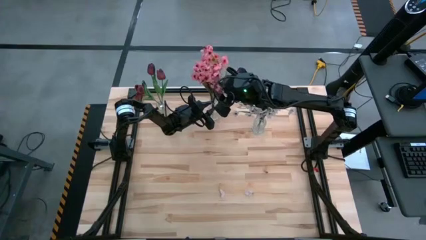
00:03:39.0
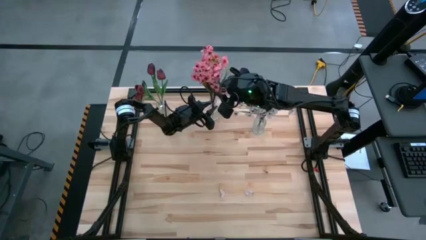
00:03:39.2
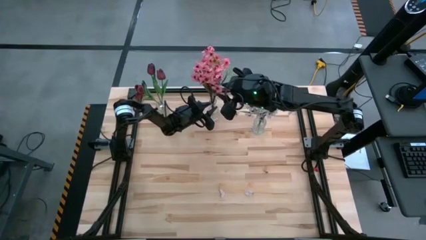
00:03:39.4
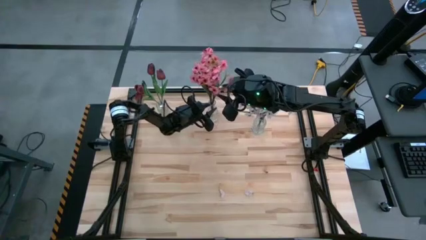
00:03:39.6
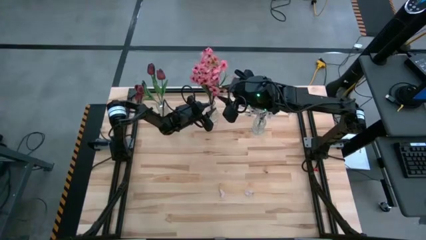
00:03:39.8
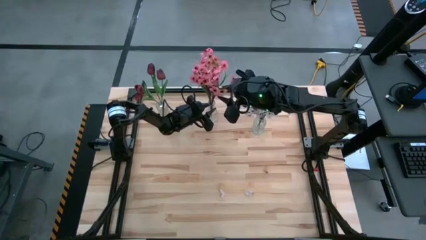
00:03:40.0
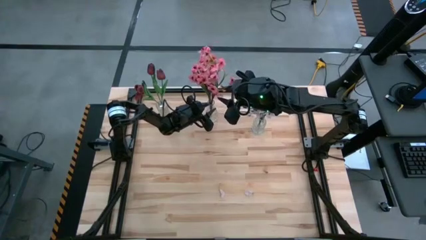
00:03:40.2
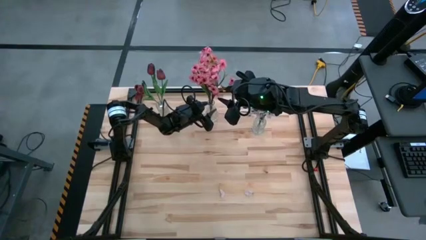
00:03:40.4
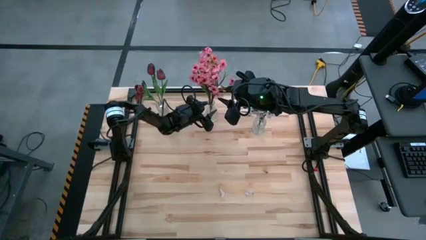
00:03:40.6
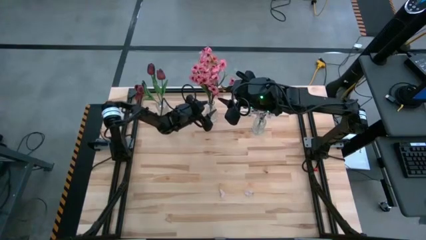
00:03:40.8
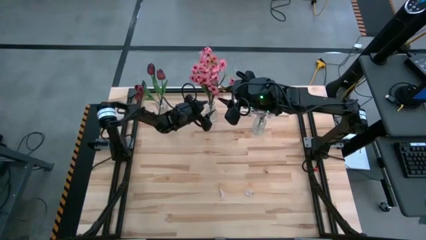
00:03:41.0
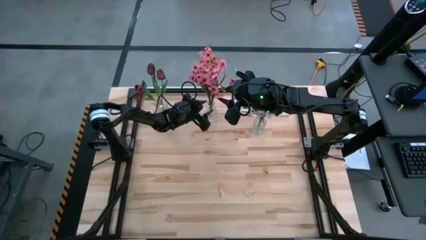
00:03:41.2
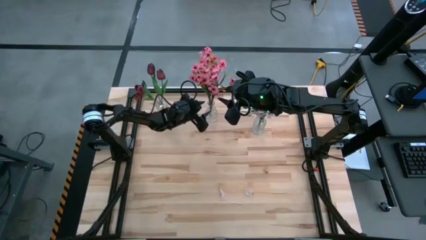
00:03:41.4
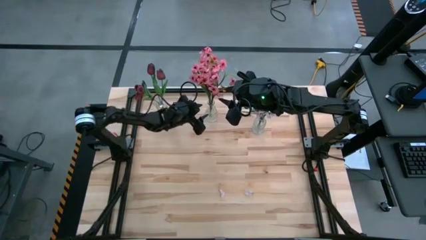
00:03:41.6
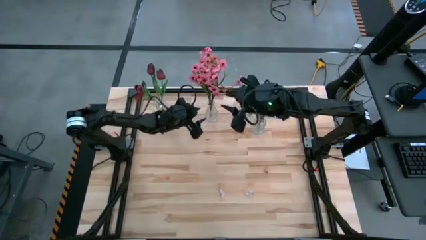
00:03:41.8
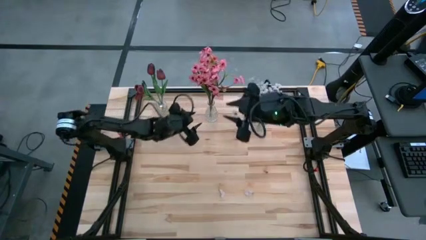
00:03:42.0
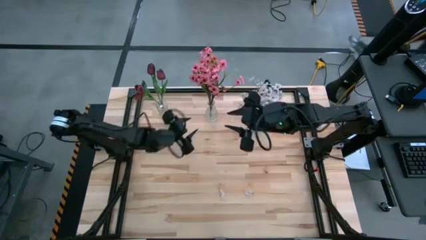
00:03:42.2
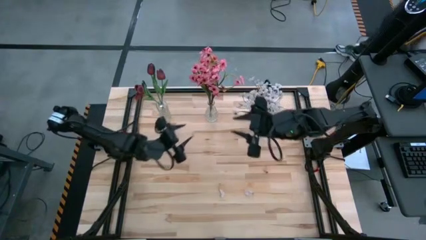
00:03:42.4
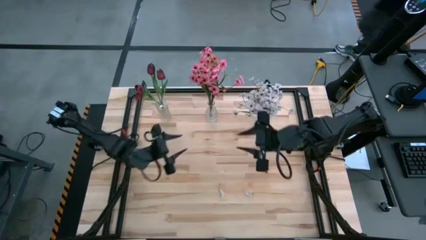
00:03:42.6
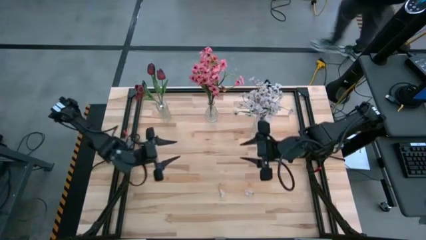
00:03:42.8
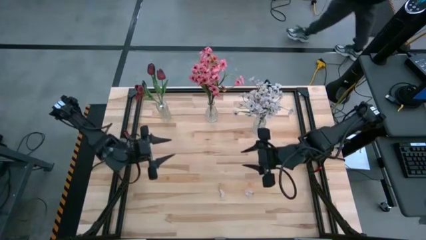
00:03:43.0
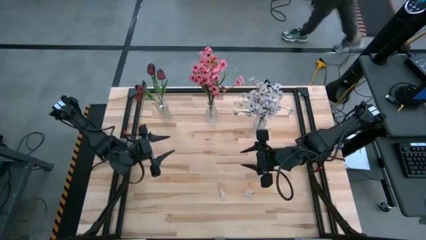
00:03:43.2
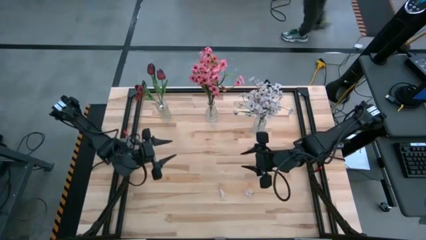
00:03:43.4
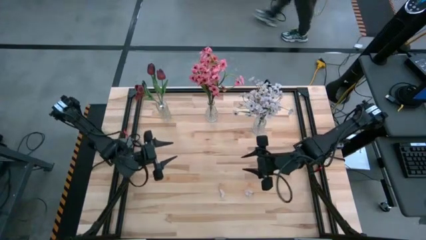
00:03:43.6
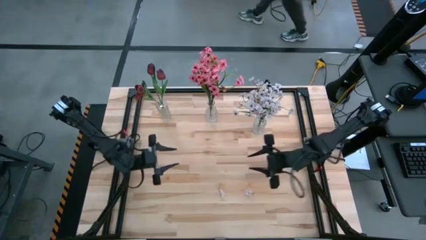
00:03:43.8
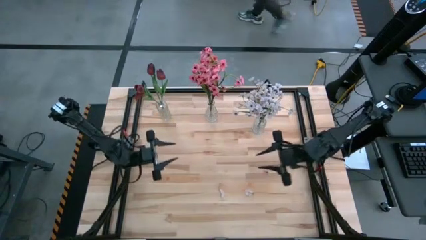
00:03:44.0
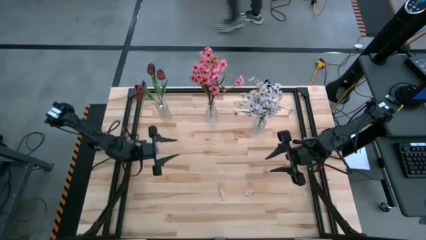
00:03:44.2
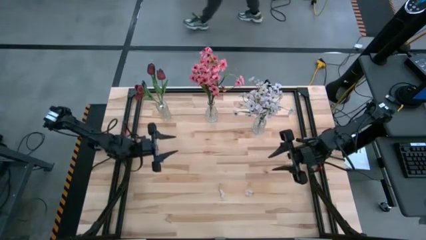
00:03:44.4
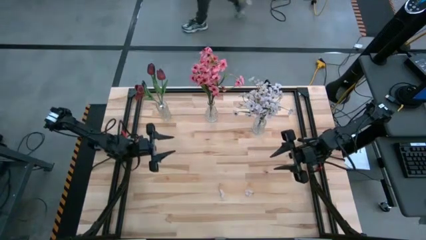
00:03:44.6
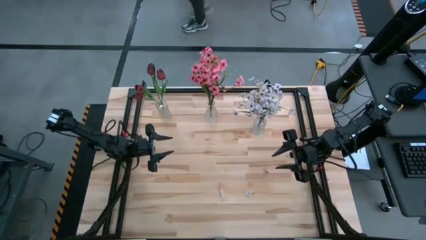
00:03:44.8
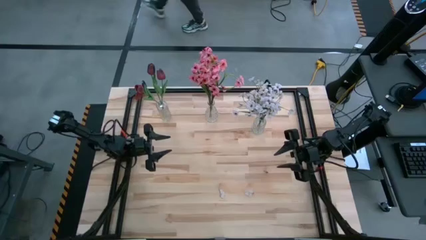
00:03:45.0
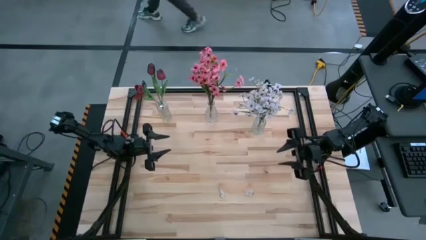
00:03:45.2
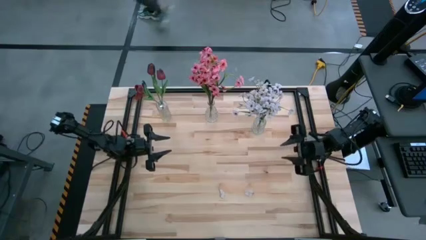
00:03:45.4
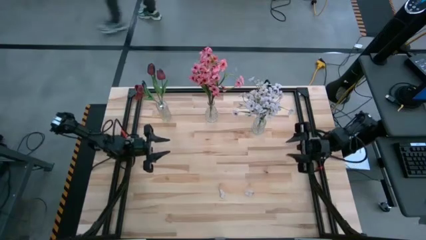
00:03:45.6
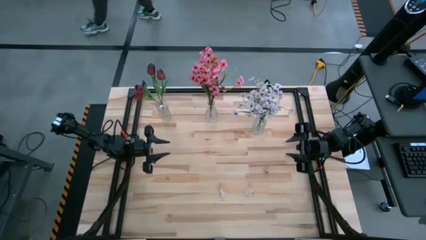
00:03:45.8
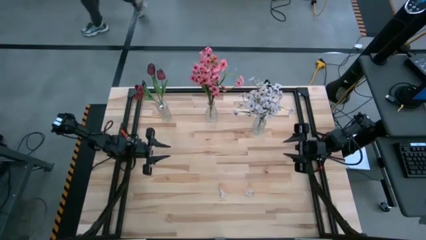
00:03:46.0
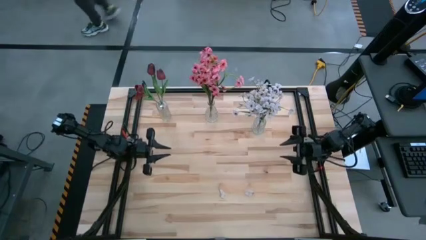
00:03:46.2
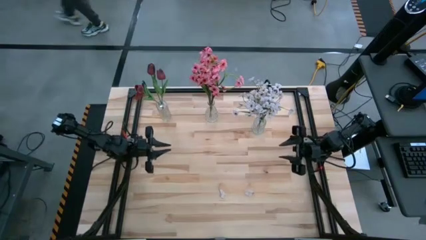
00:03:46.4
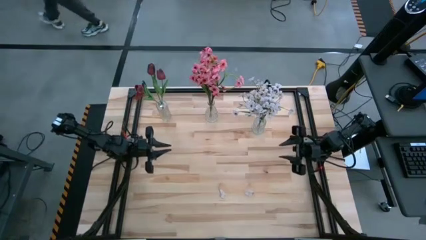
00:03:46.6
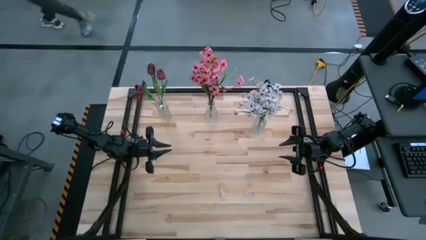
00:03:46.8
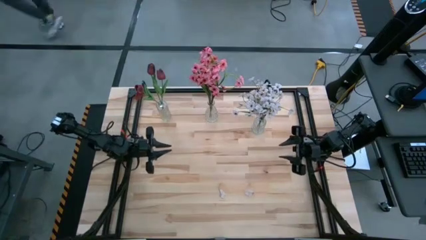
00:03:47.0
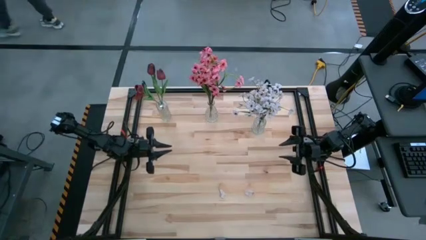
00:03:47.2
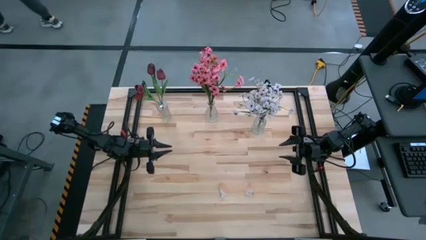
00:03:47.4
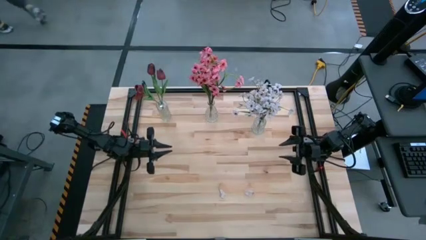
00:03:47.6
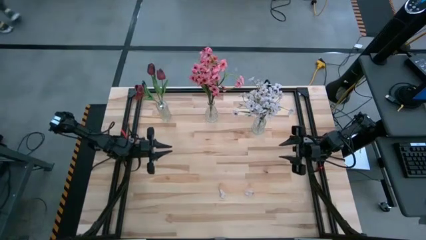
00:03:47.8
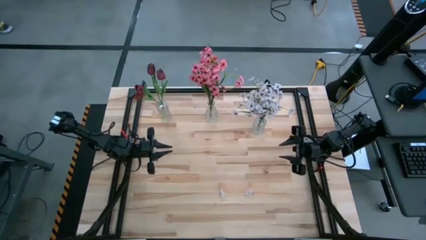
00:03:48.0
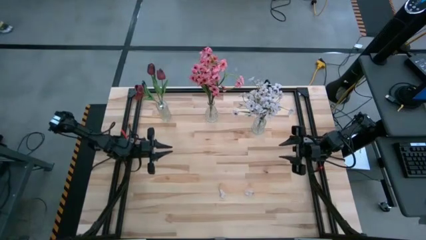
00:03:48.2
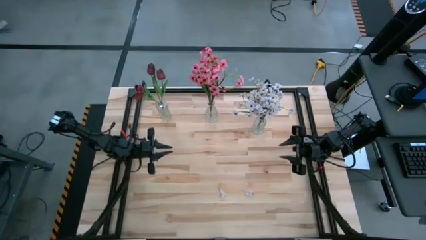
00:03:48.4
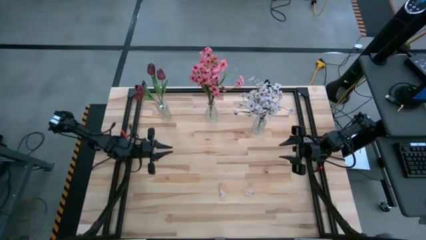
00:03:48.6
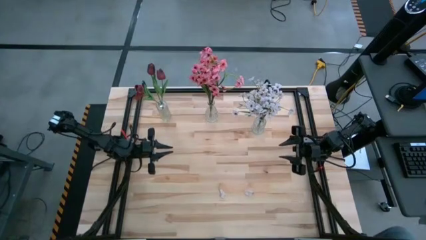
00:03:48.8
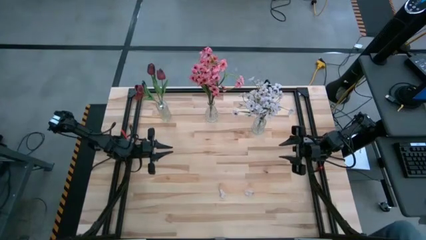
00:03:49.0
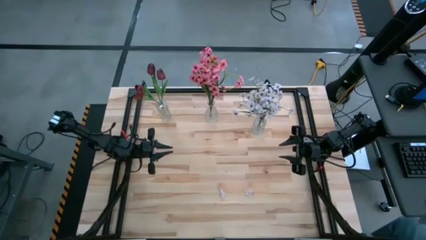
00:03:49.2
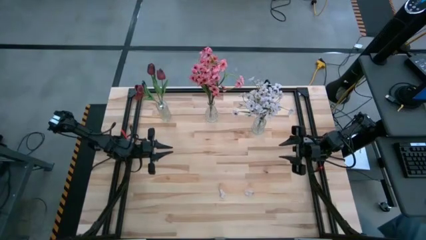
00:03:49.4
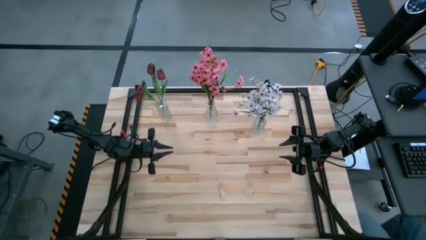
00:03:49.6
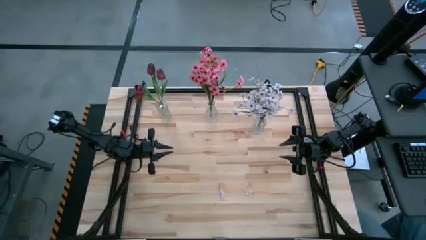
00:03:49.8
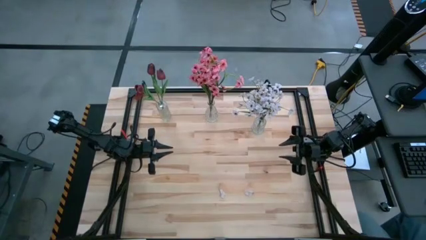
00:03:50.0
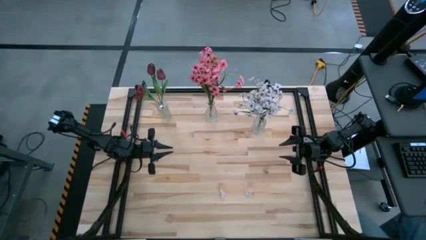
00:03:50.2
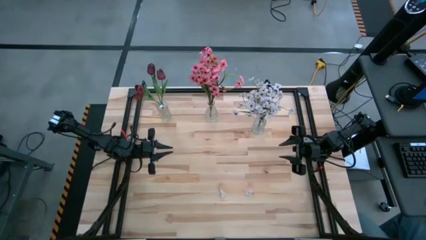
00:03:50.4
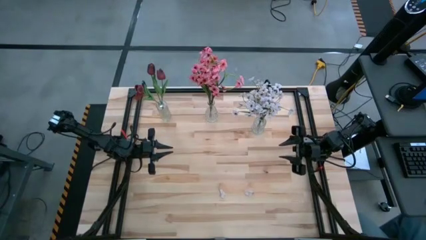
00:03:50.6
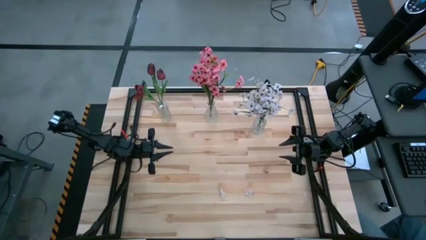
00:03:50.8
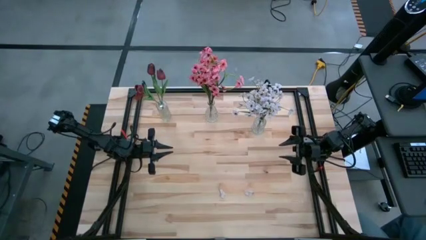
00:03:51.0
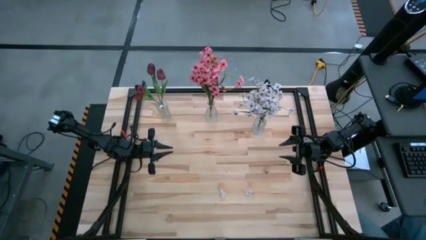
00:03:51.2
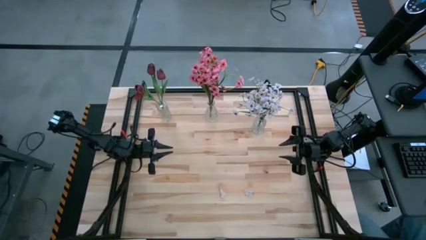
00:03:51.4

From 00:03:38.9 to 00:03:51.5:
Task: Sort flowers into vase by color
Return to Home Position

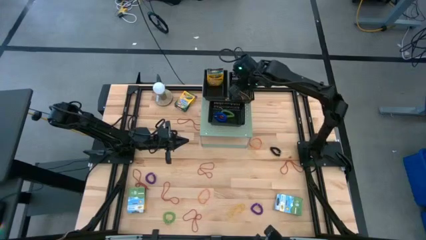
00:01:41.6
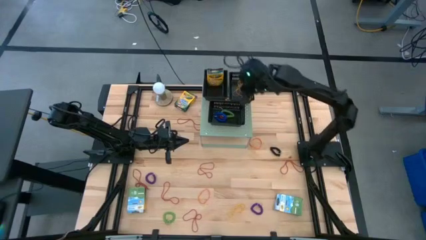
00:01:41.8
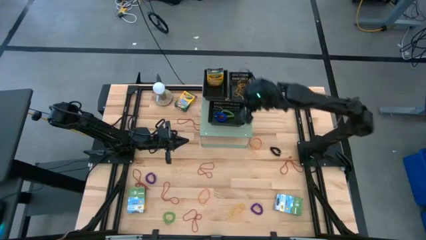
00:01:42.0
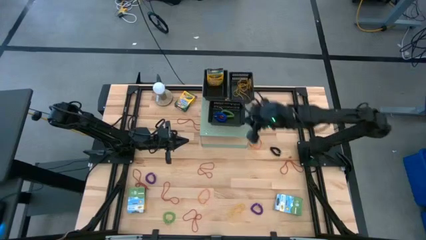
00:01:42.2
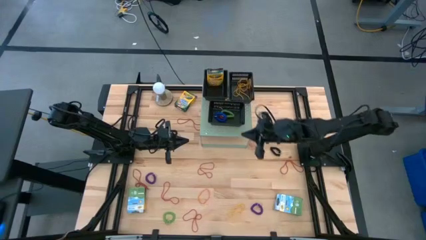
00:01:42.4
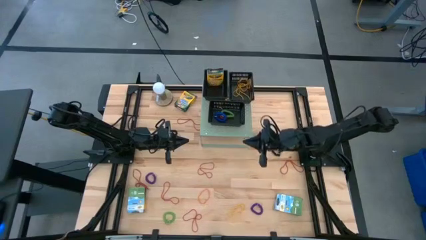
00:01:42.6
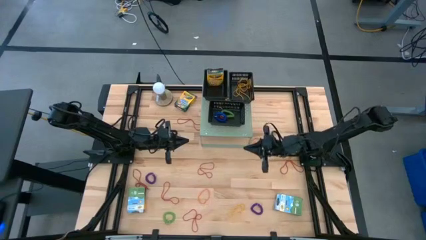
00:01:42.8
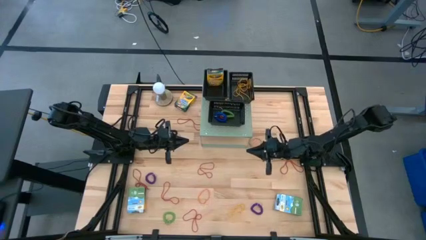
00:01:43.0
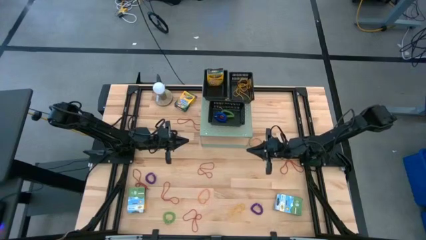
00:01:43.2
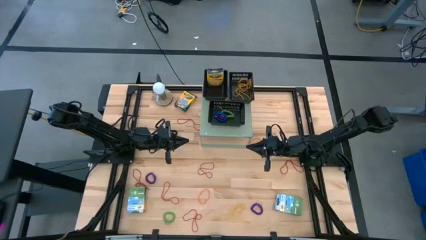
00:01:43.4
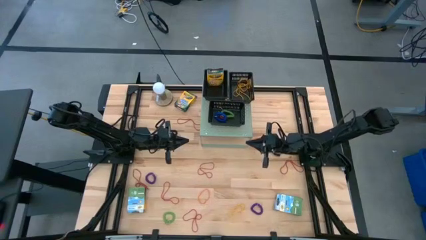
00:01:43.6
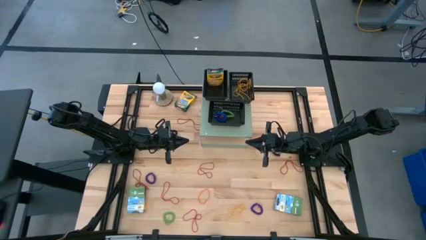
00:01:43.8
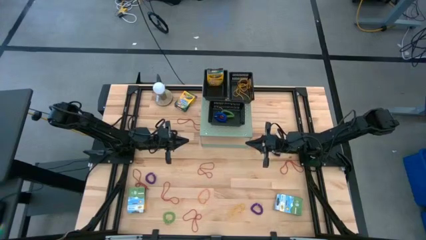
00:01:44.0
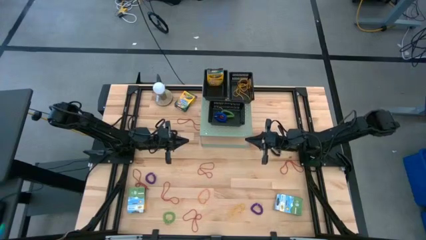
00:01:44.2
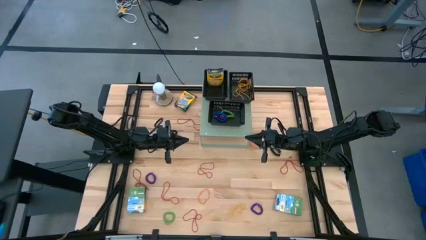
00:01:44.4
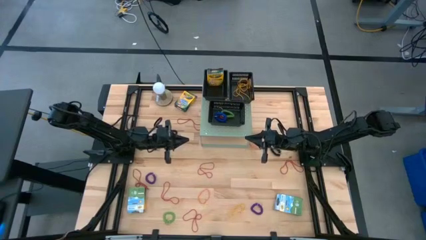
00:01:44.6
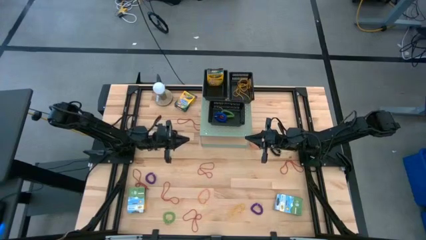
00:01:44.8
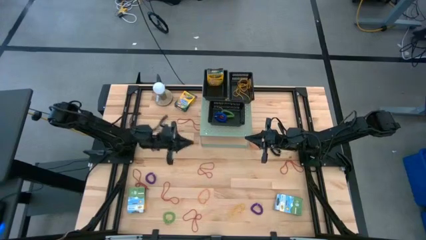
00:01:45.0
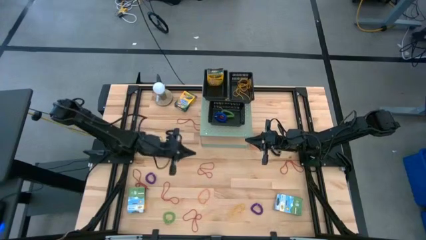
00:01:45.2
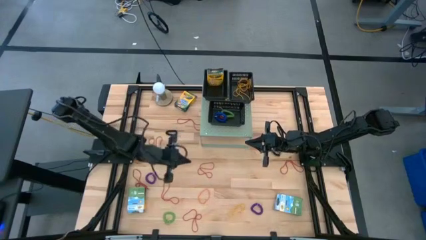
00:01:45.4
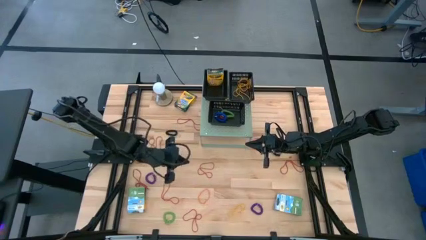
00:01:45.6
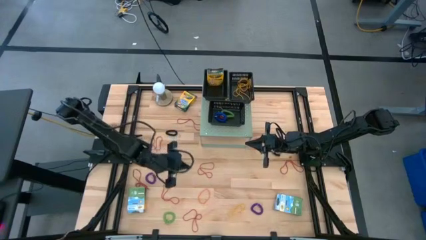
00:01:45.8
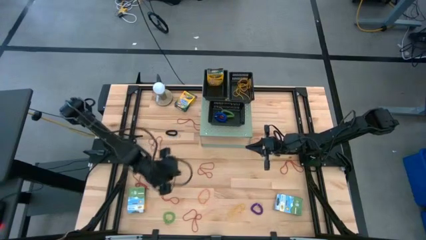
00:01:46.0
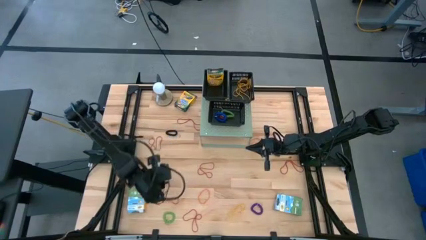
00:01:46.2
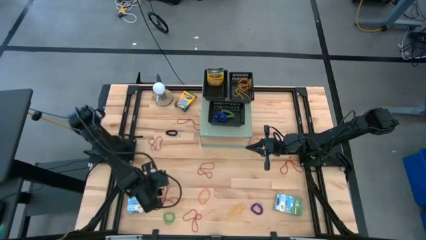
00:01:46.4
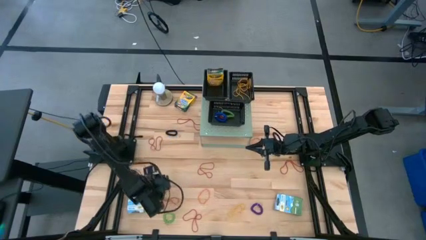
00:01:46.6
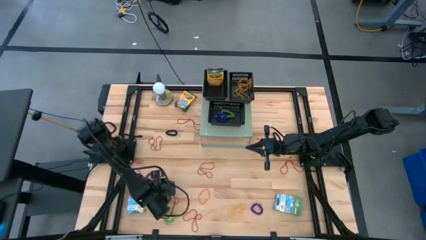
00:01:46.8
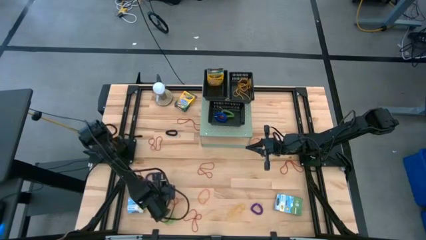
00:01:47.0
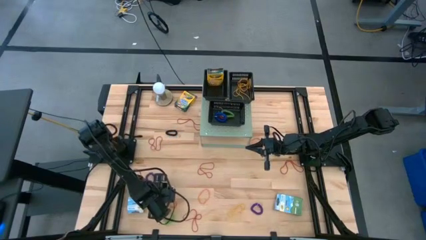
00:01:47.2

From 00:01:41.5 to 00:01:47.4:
Task: Pick & Place Office Desk Supplies
Put the red rubber band into the top right black bin on the shelf
